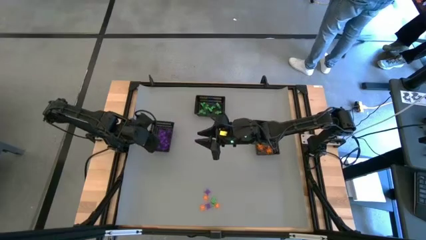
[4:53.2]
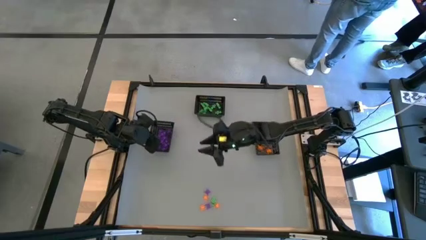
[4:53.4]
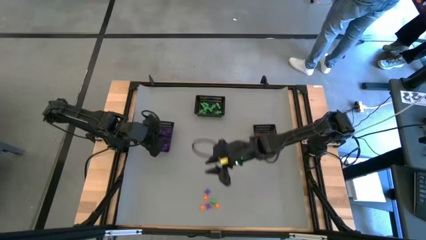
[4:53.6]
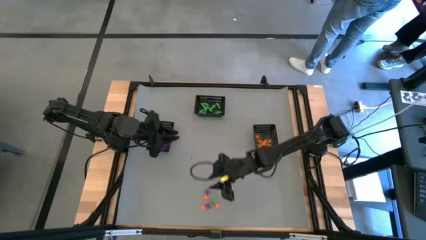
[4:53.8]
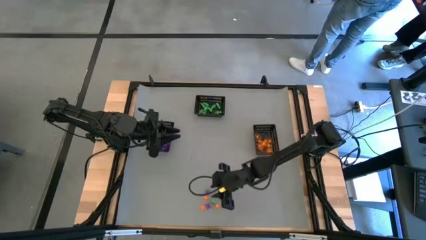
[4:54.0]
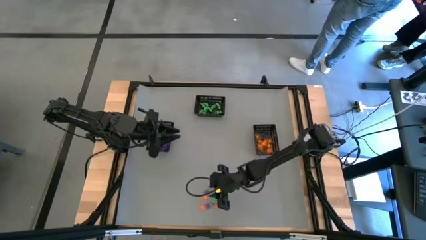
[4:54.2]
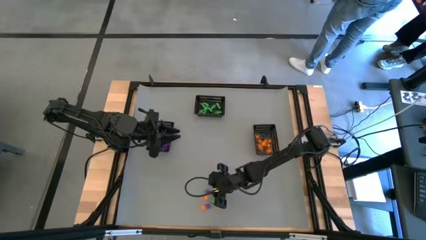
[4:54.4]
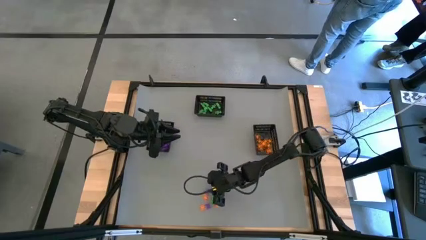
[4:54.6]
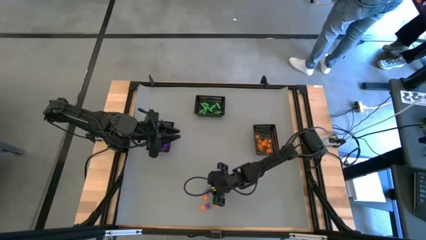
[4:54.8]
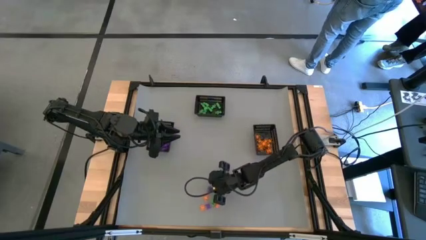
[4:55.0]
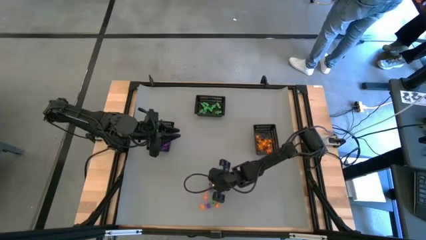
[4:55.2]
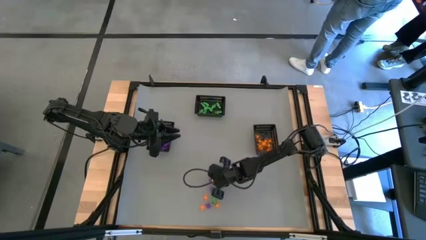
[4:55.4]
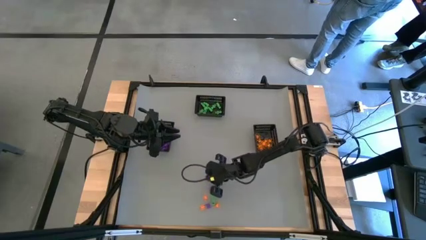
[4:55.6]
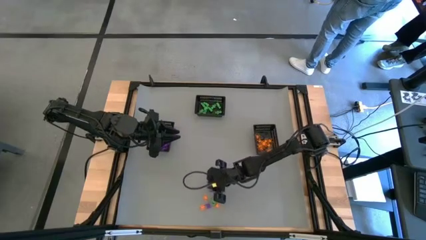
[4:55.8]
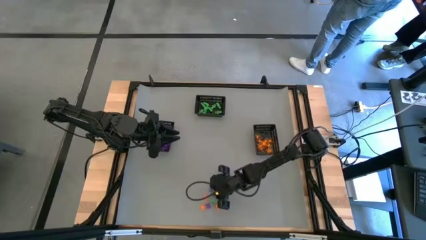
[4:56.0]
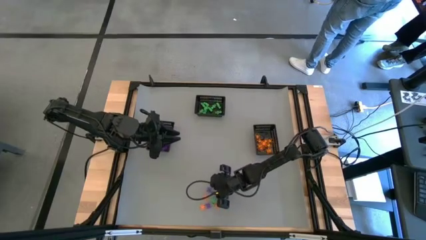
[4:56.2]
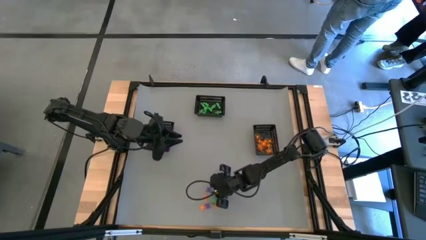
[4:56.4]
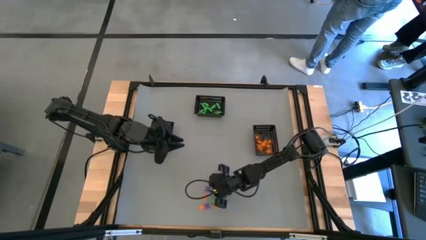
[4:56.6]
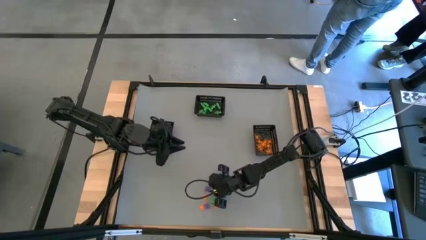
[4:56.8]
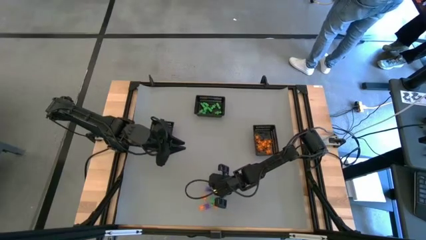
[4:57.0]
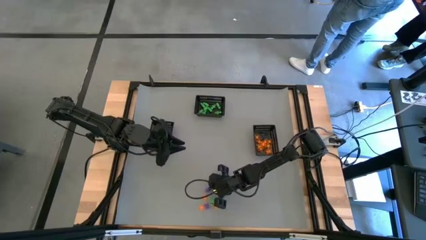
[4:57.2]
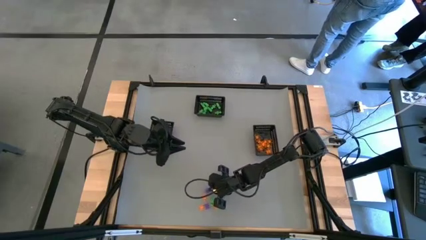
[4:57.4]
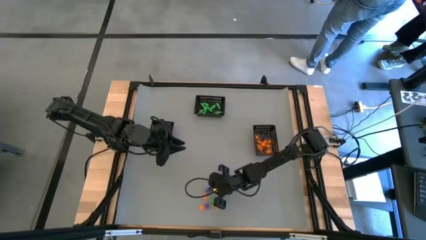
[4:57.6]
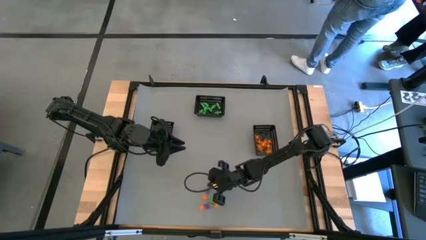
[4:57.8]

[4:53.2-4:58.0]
Task: Sort Halloween decoration
Put the top violet spider toy into the left bin

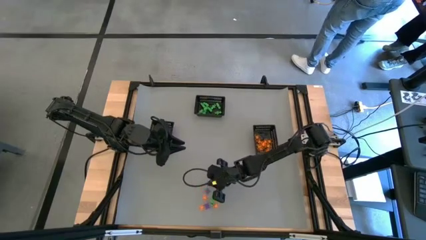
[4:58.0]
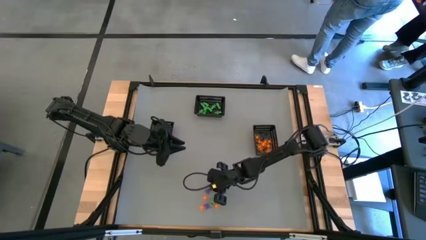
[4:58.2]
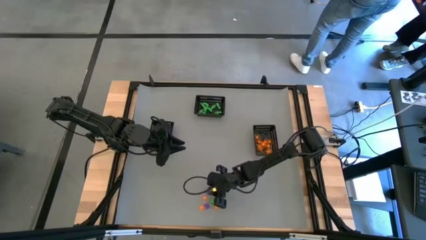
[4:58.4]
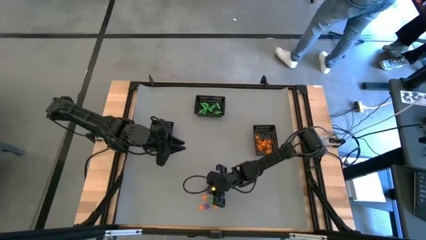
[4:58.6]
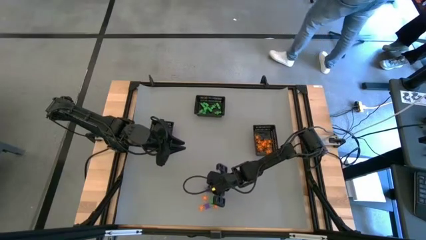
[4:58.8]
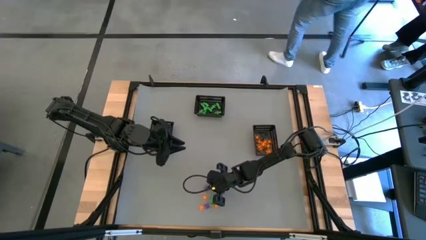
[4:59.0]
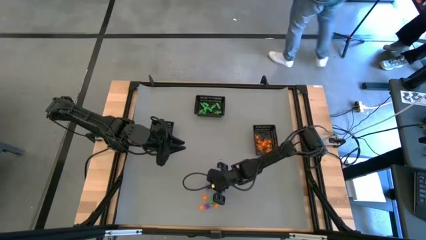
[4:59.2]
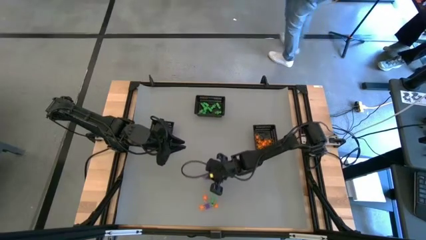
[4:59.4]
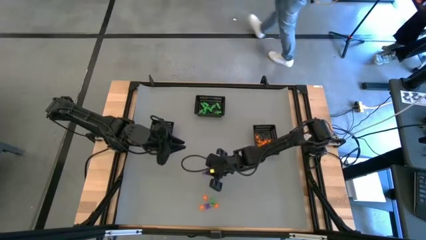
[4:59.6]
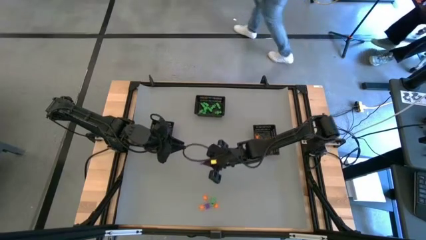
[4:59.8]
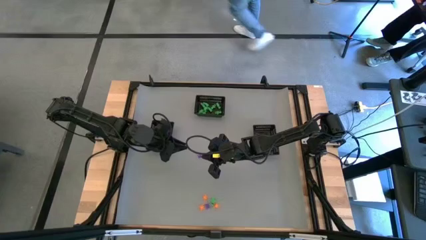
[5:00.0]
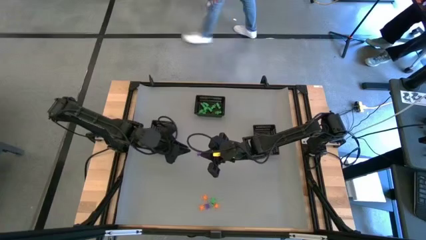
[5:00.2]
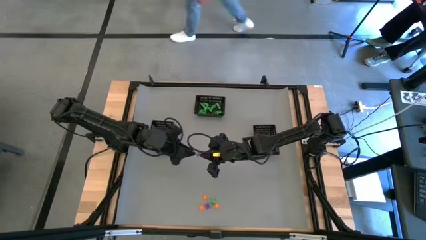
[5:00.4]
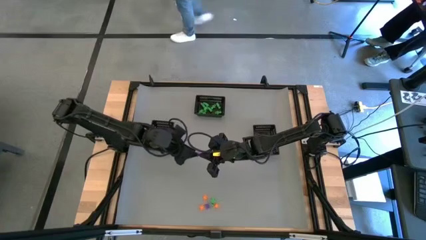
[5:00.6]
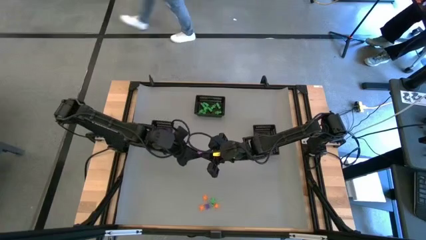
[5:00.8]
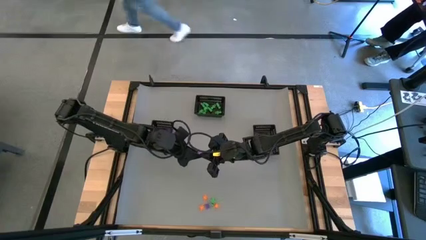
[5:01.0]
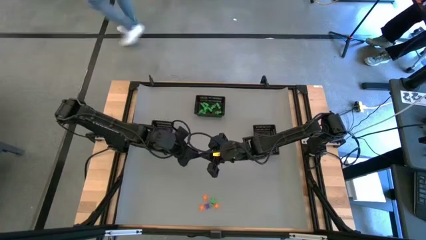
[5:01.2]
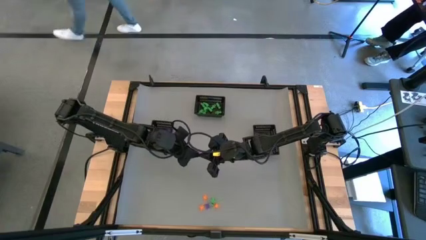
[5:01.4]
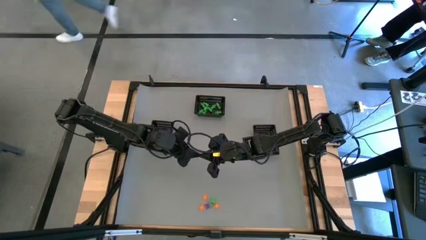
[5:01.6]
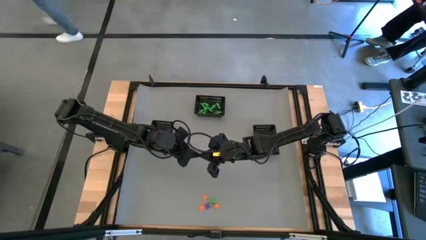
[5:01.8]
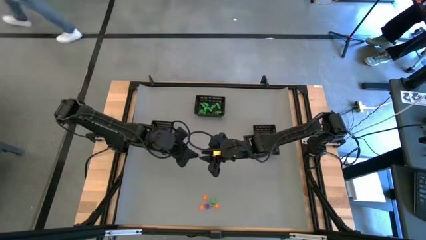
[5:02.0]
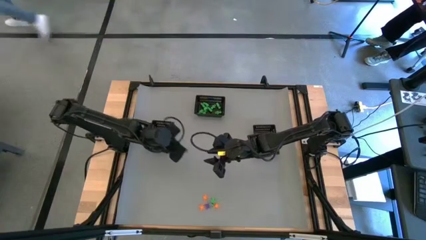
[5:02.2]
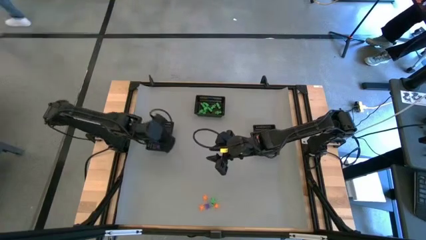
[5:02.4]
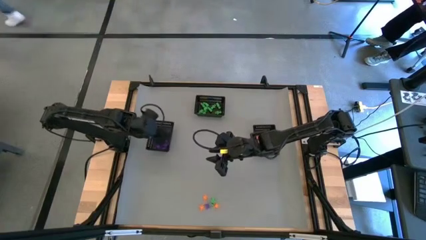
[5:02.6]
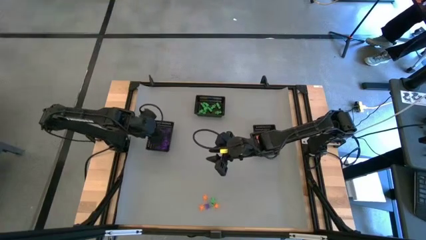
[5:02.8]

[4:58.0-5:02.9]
Put the top violet spider toy into the left bin

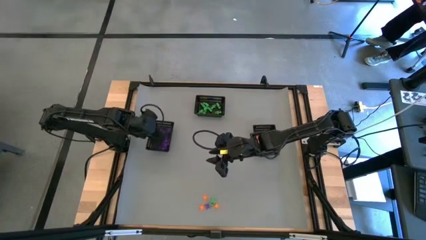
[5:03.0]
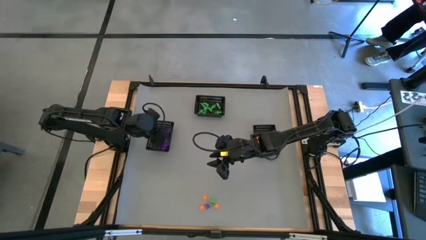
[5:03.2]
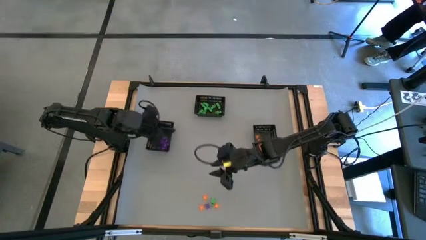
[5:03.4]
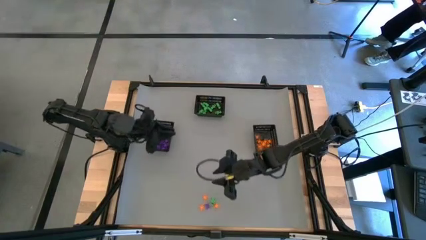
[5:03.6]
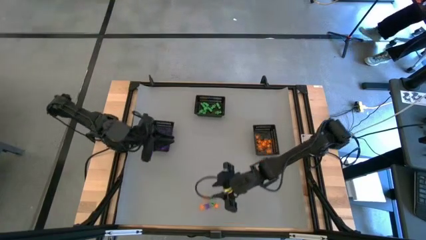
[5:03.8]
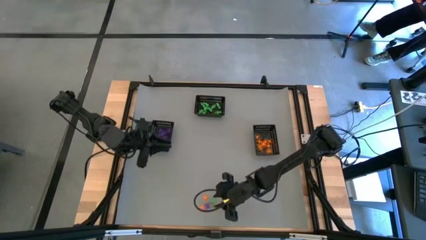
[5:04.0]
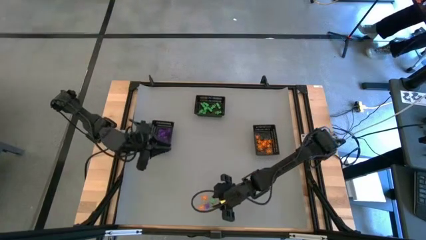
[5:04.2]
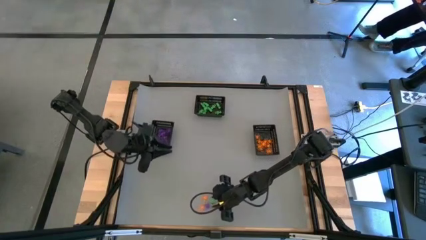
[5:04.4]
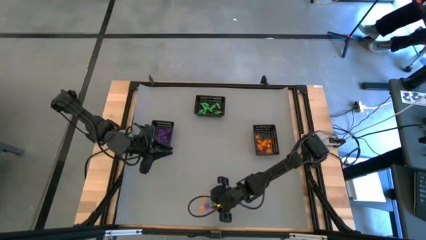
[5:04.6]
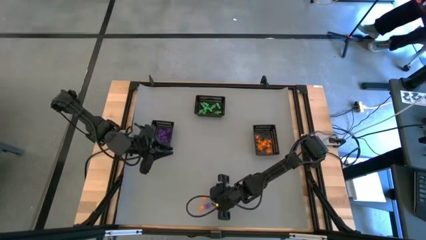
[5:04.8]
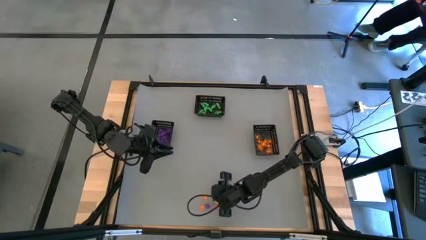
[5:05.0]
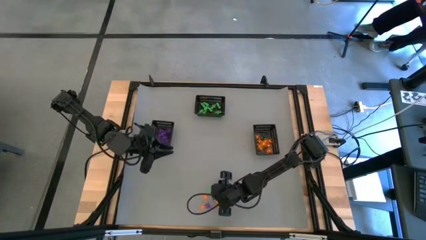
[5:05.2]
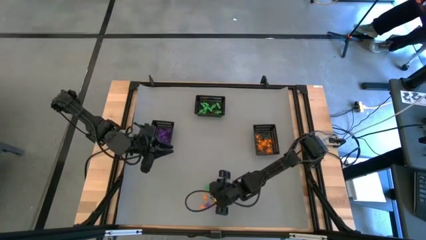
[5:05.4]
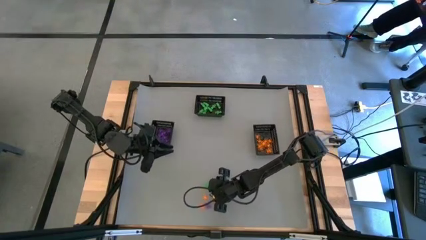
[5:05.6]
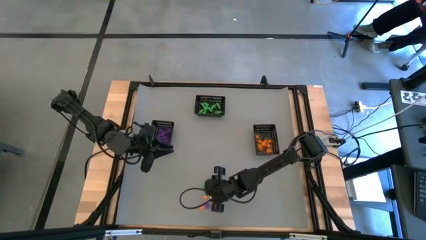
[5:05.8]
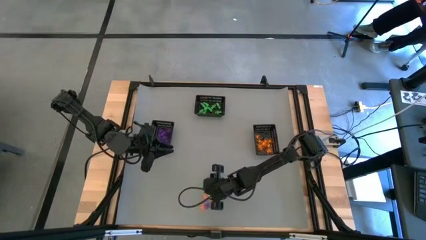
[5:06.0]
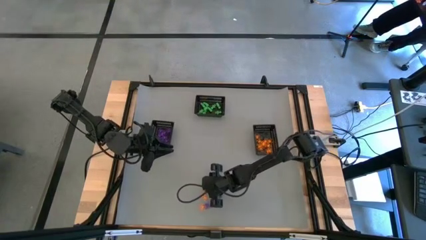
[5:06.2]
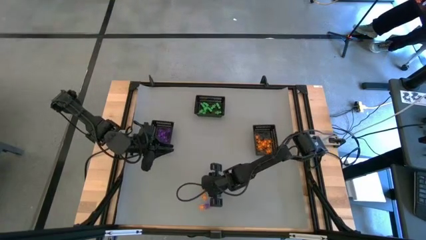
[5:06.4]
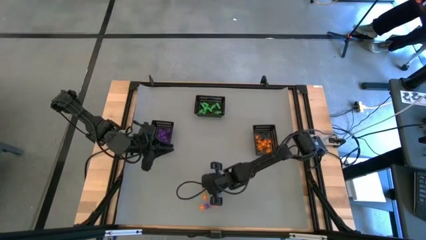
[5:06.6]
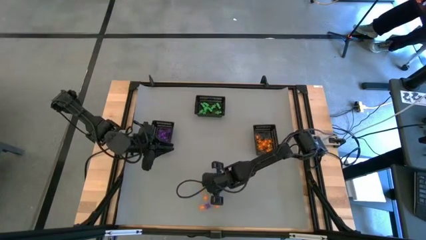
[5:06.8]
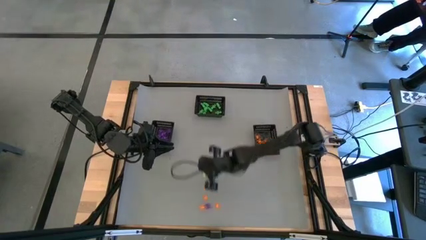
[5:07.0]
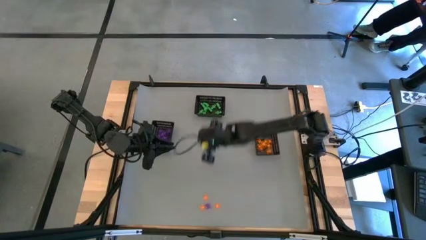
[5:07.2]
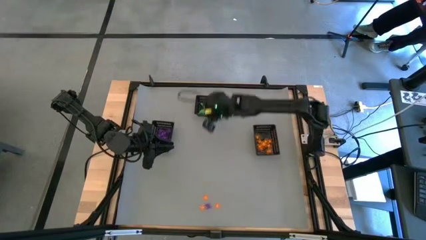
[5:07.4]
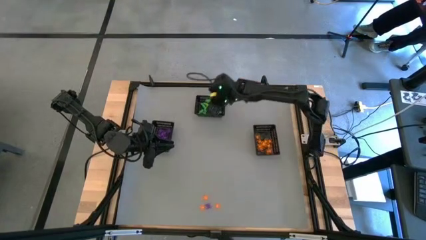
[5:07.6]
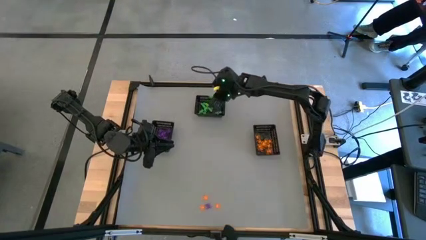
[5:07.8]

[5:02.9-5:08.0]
Put the green skeleton toy into the top bin

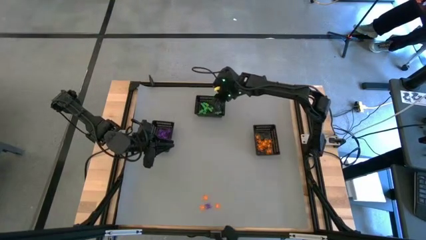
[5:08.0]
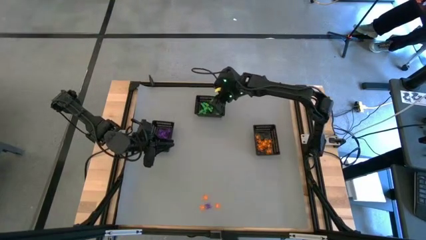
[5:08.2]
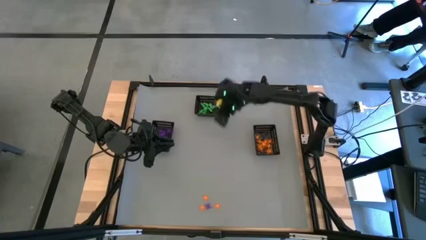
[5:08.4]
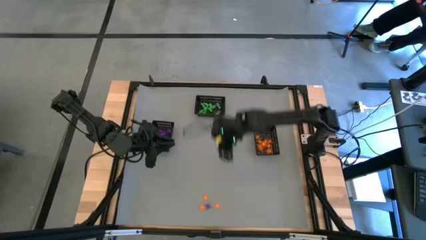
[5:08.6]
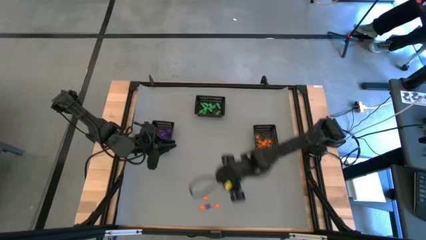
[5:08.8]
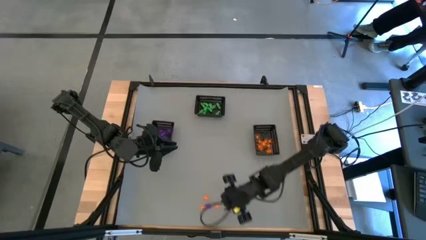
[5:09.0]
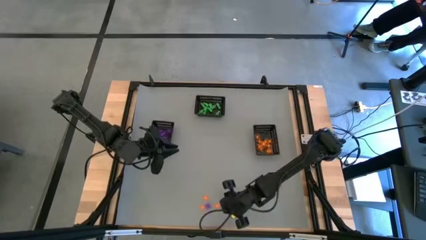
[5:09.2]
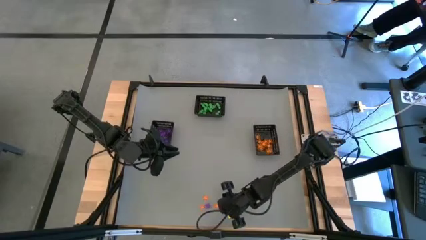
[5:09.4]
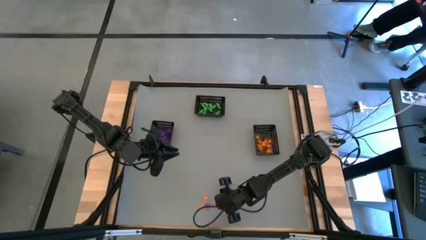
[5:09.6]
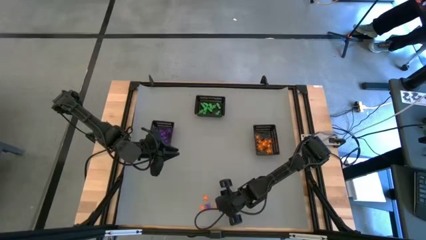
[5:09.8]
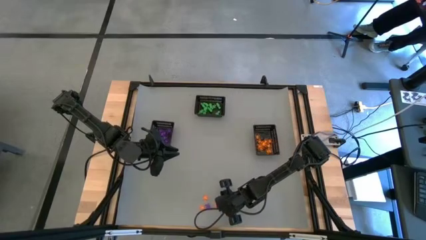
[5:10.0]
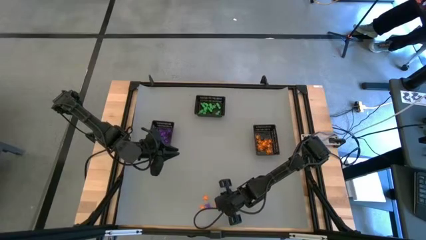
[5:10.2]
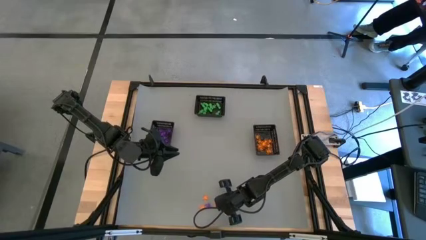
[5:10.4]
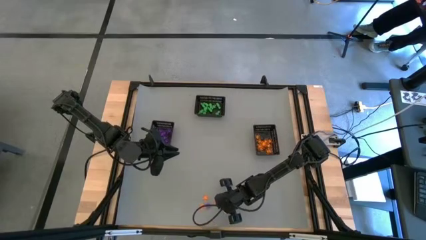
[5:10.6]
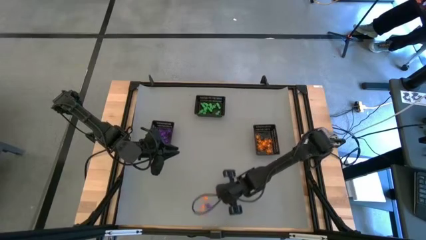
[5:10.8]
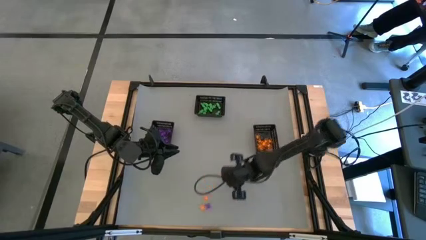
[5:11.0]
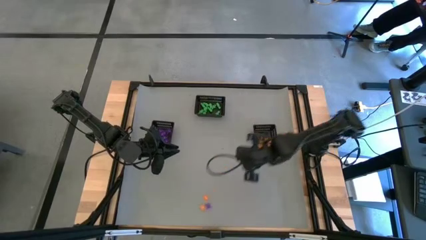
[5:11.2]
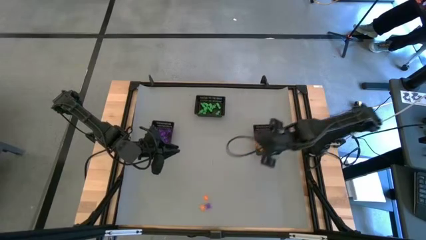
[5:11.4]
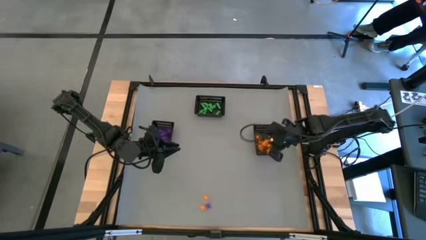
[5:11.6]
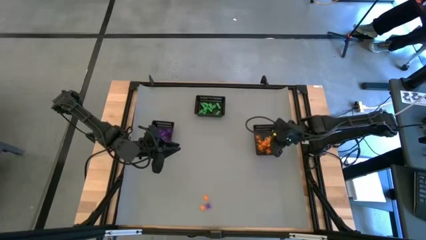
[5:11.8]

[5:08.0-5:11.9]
Put the bottom right orange spider toy into the right bin
